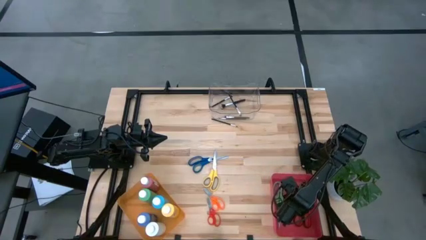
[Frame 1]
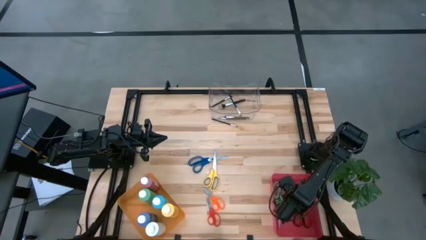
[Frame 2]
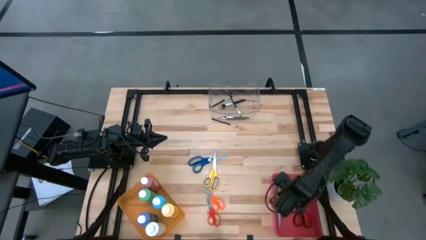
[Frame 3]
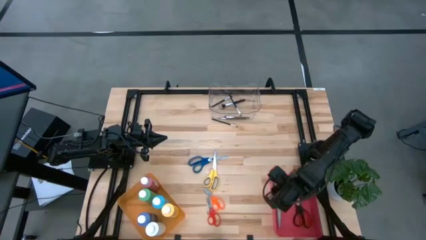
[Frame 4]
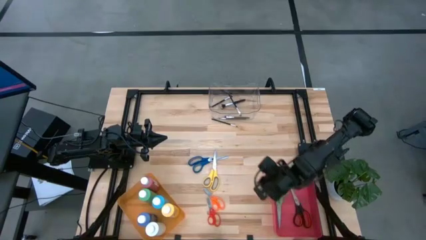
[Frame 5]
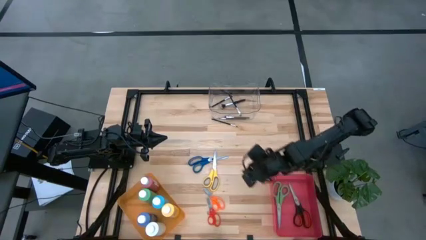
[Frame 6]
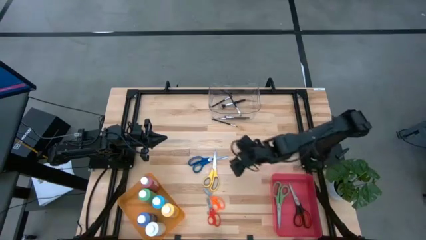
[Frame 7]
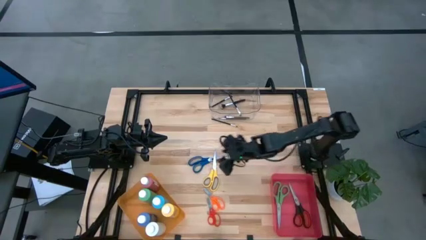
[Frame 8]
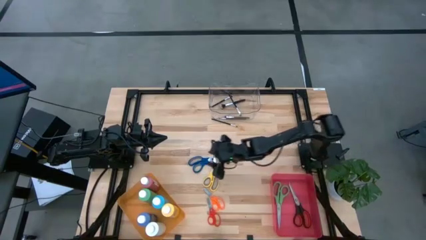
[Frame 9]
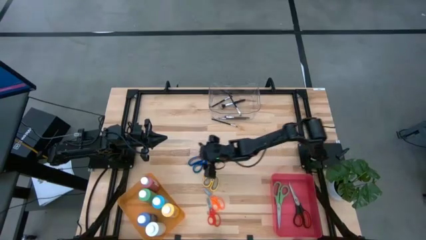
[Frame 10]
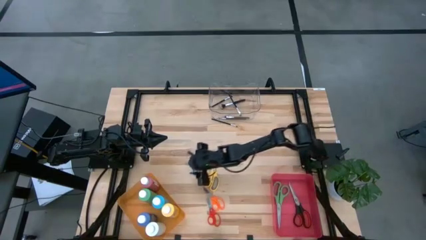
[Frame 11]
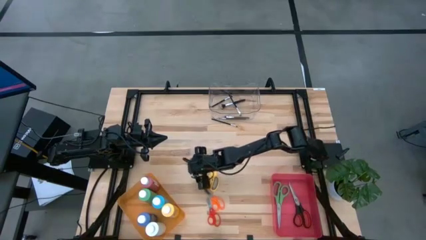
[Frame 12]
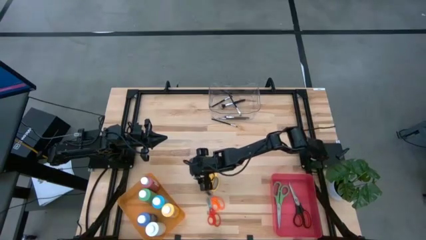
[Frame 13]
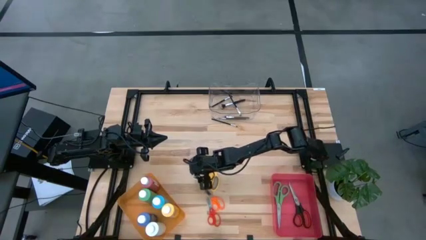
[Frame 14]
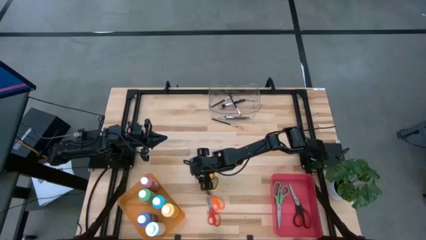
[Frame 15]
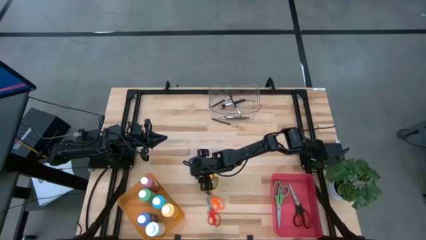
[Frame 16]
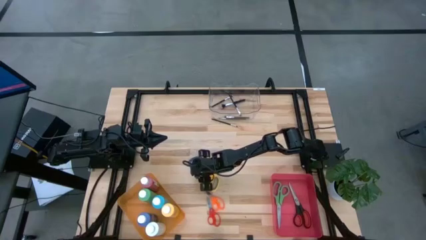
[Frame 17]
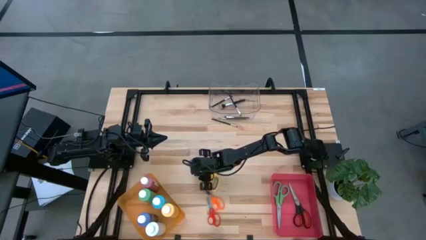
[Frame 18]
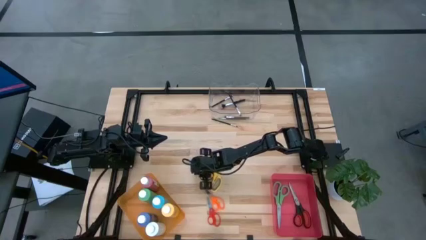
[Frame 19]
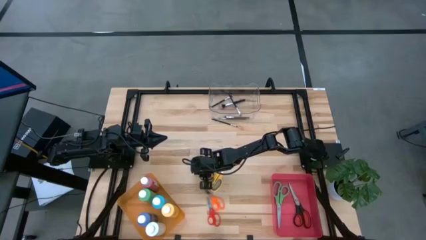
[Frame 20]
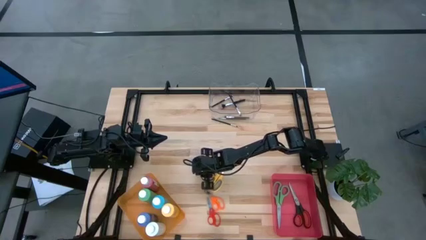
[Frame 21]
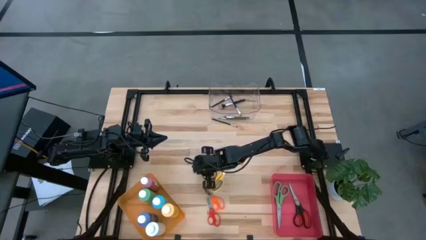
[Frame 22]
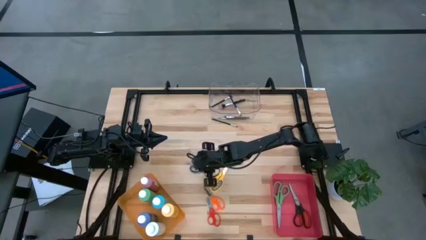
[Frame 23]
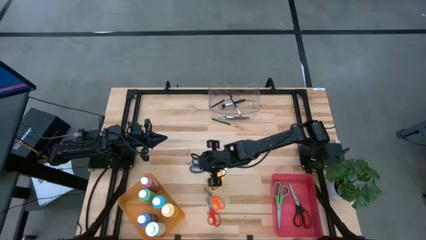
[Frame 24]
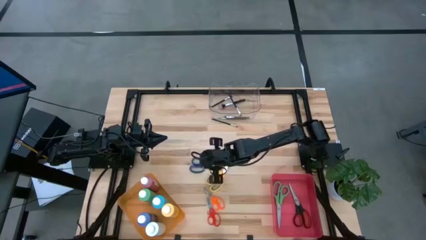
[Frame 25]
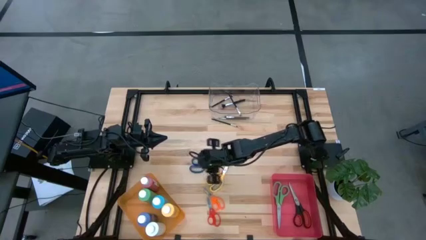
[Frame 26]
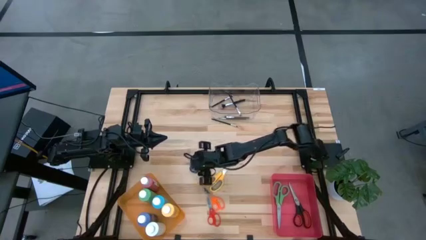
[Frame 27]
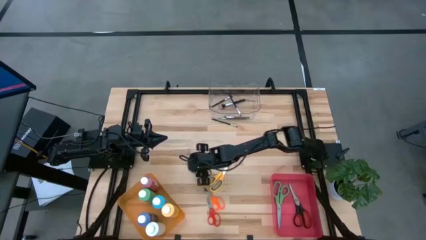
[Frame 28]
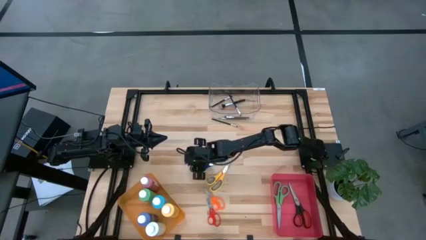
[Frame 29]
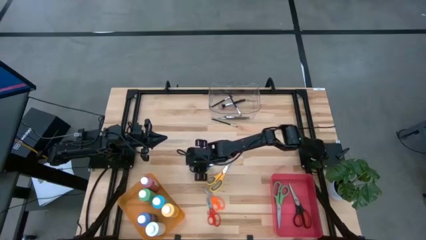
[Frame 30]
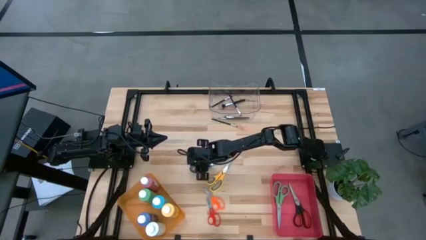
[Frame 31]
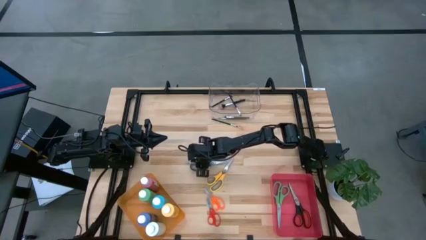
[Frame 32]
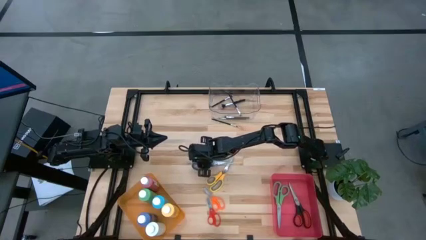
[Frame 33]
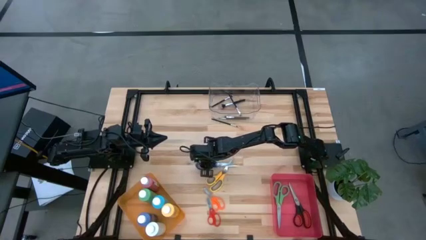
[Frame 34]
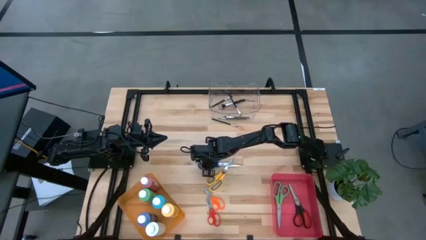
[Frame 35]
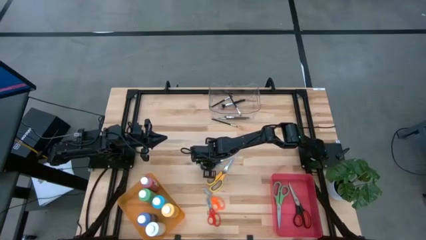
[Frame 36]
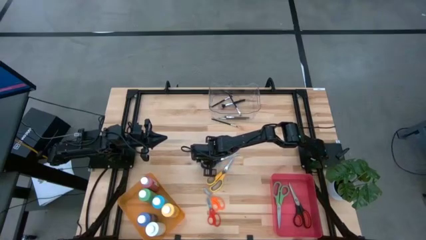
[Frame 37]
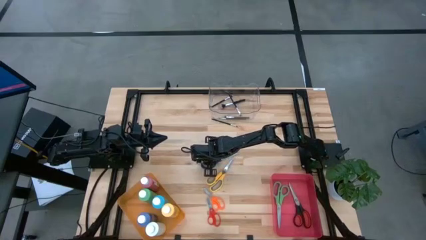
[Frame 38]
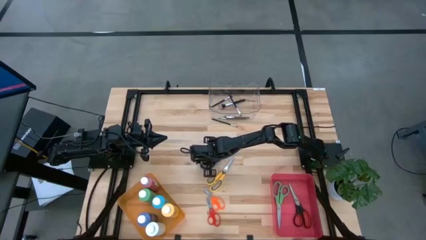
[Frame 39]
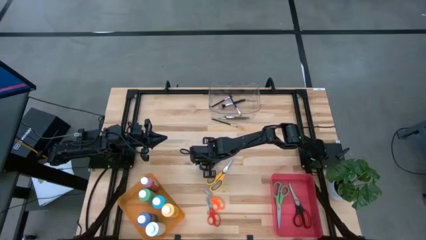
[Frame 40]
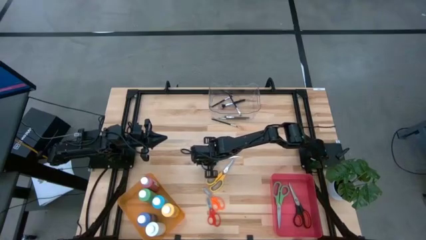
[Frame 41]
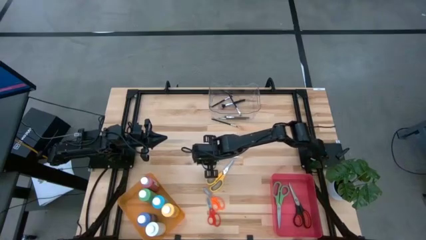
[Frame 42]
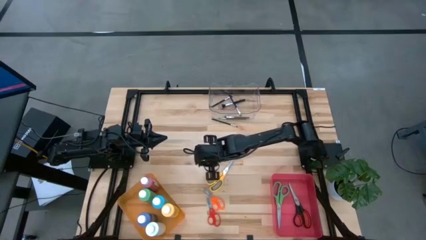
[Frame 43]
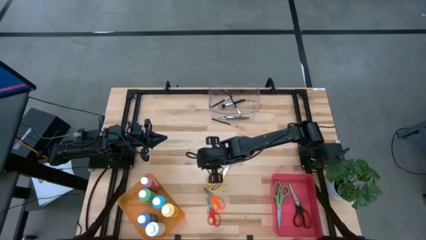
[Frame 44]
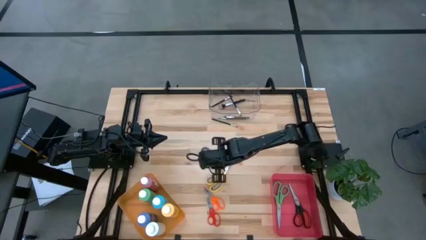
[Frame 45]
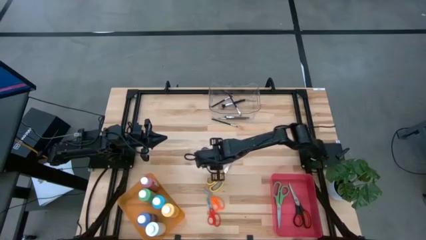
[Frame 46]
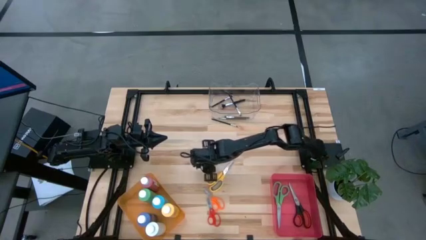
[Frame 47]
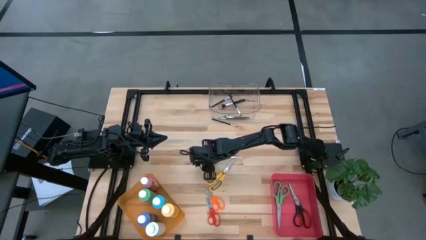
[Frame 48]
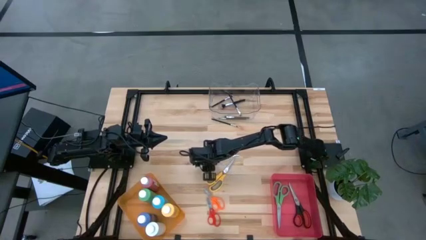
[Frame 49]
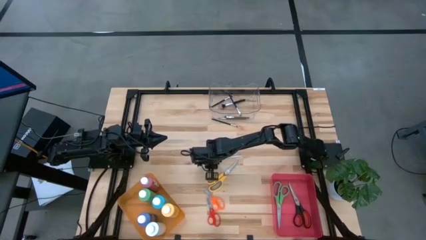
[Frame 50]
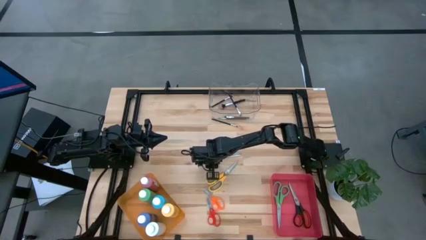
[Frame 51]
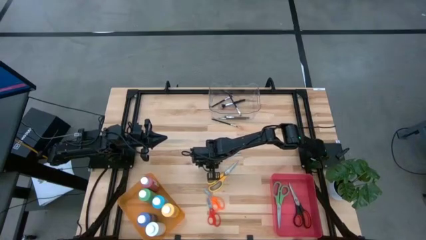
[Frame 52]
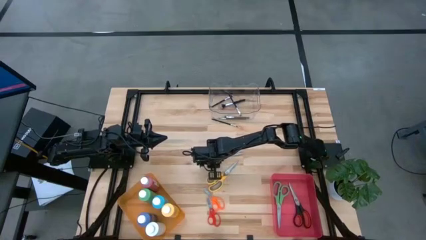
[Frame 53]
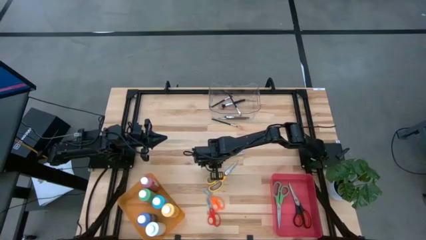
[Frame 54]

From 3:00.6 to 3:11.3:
Task: Pick & Place Paint Supplies
Put the blue scissor into the red bin

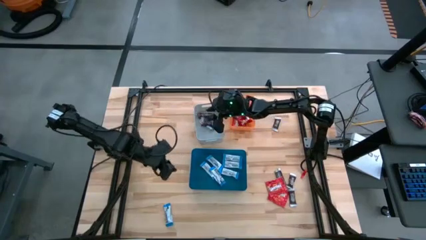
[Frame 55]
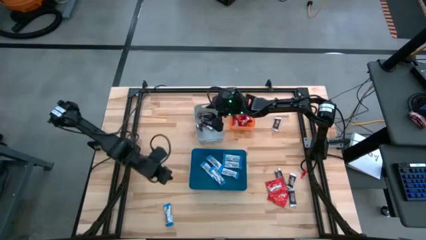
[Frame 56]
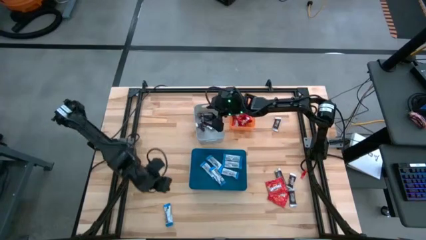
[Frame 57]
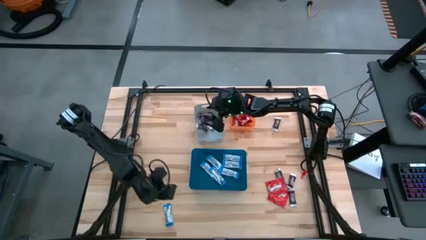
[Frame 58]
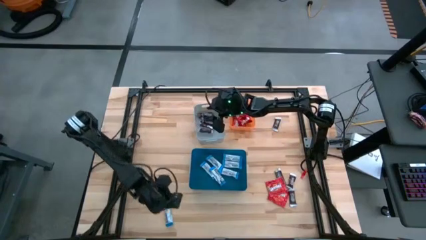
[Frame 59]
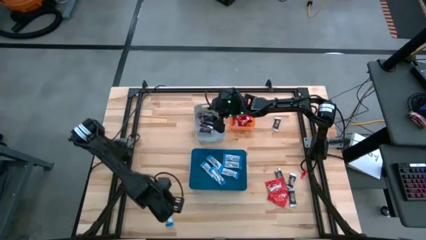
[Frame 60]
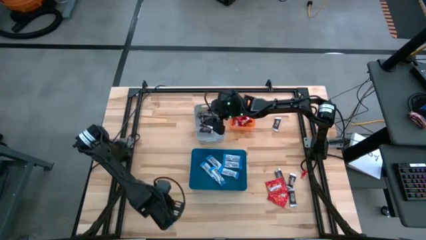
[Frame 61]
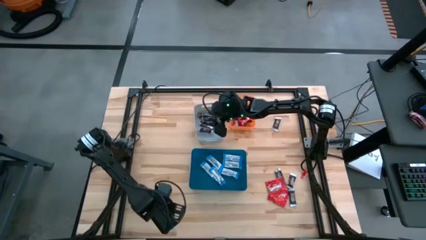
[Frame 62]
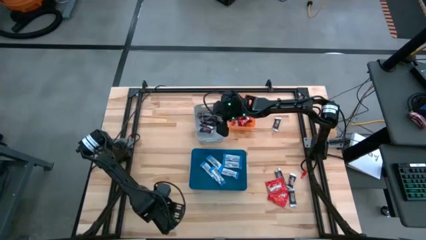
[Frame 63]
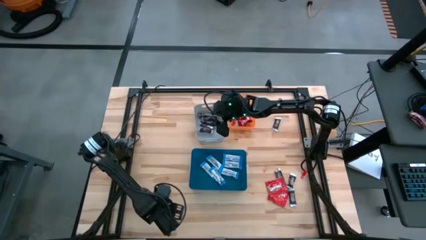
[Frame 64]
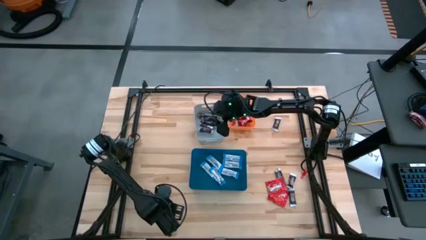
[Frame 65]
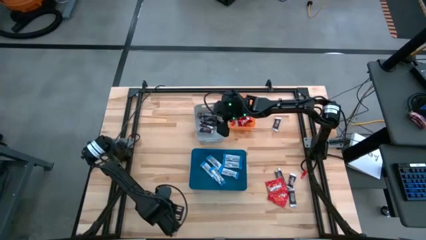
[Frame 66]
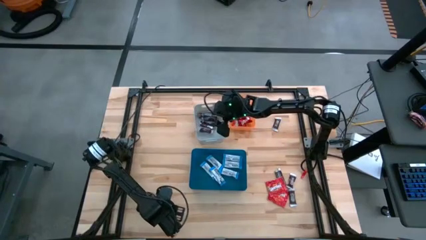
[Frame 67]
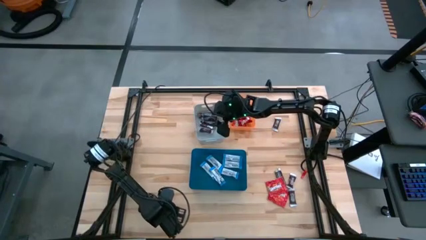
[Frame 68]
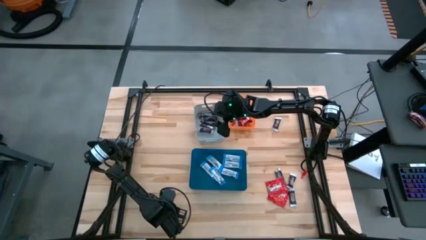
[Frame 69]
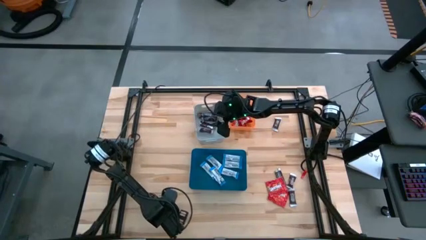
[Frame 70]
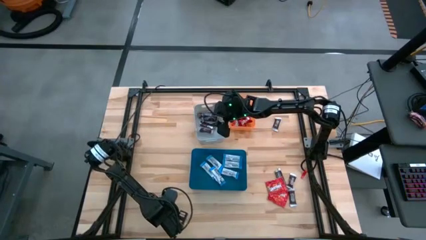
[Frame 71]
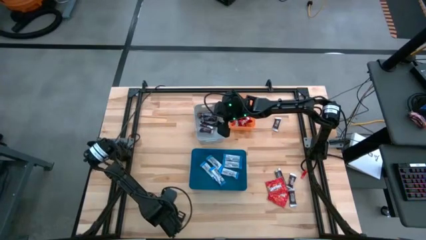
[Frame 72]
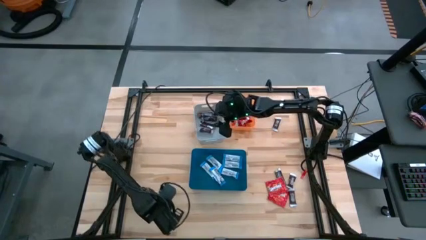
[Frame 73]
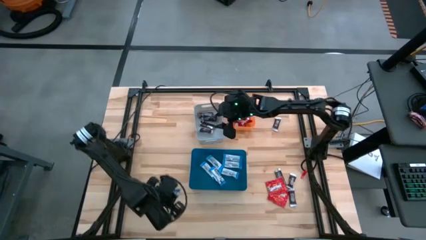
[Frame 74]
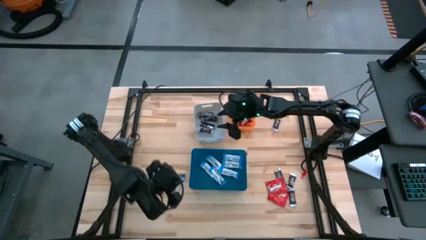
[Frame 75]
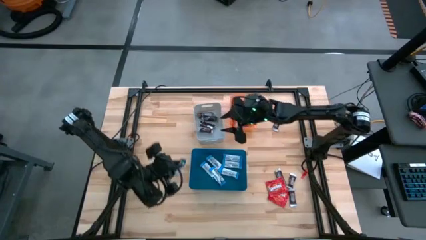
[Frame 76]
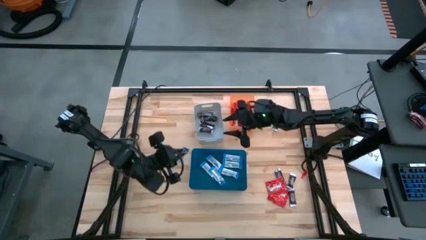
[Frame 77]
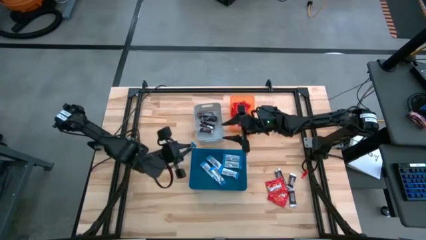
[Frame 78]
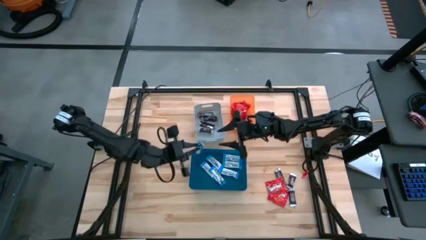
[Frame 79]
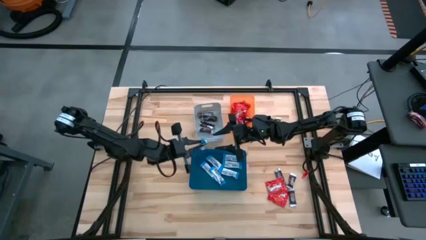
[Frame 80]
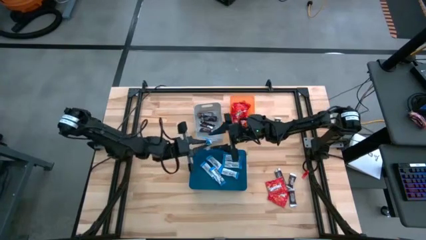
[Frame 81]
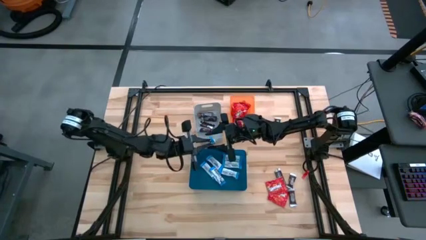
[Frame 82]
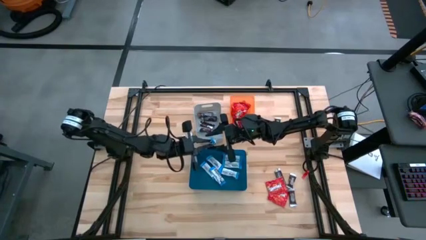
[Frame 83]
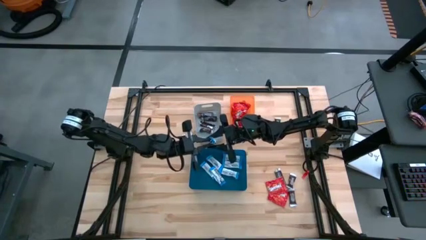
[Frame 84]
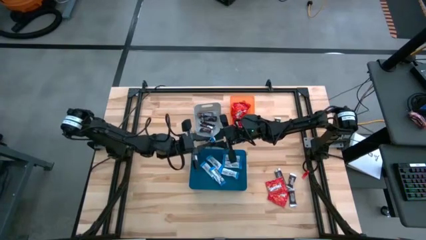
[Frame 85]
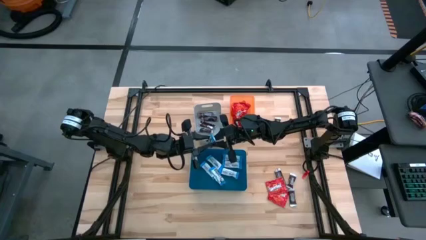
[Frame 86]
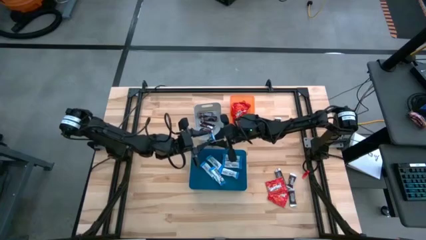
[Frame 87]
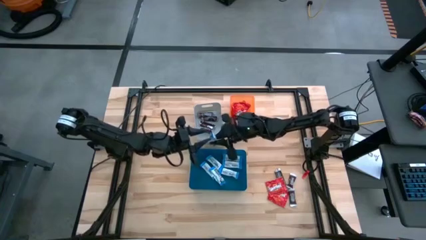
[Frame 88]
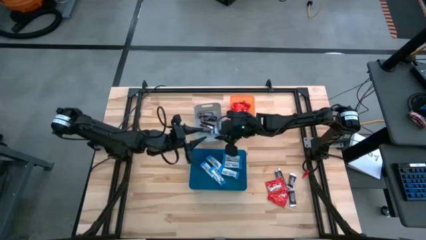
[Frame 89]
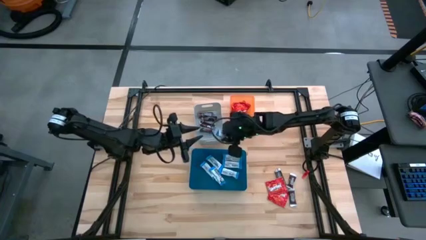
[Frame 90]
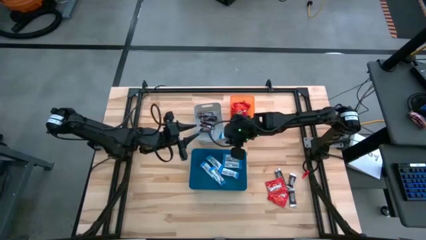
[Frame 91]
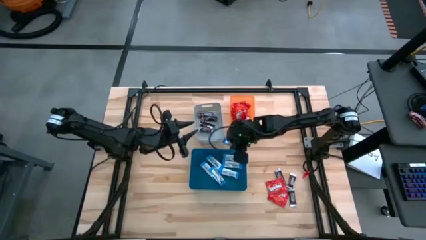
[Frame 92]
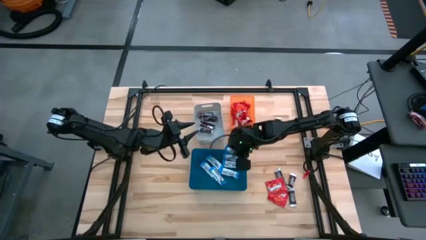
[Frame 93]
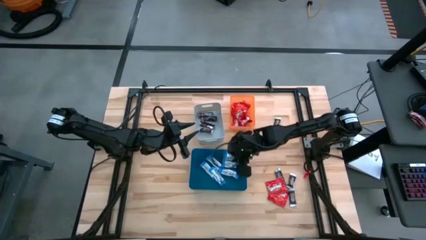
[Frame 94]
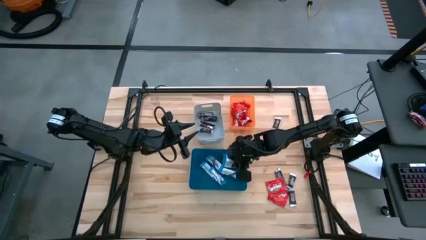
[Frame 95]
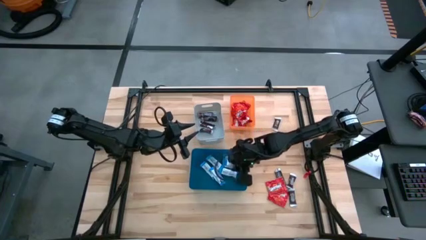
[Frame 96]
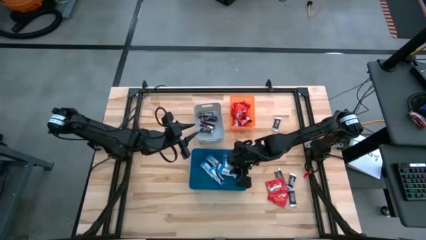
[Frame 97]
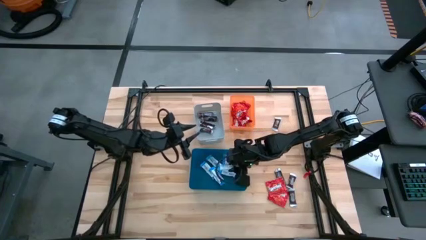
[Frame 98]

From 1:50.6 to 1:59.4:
Task: Sort candy
Put the white chocolate bar into the blue bin
